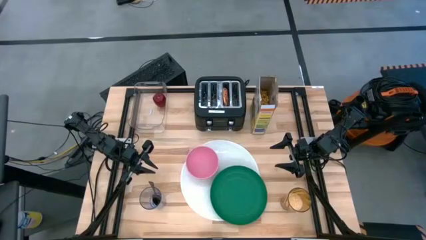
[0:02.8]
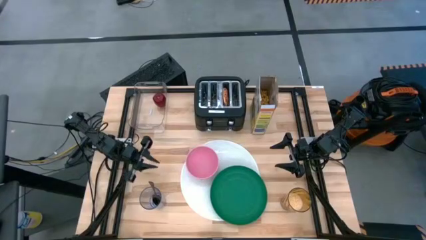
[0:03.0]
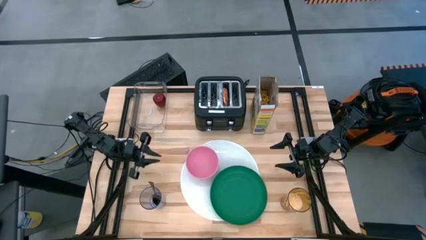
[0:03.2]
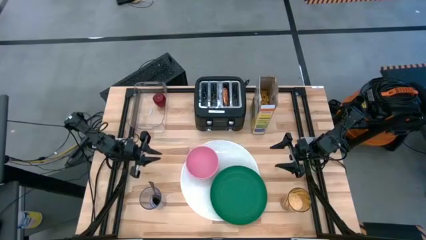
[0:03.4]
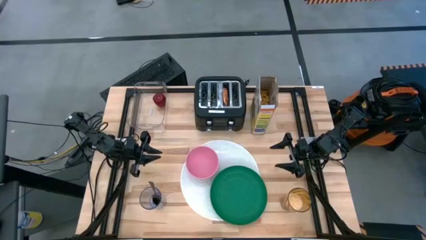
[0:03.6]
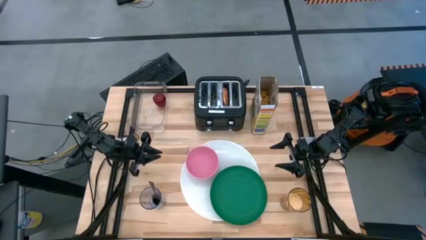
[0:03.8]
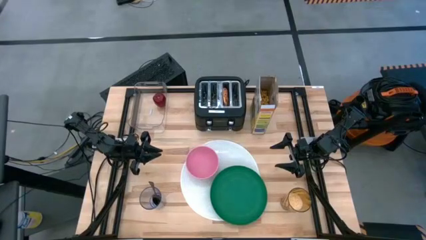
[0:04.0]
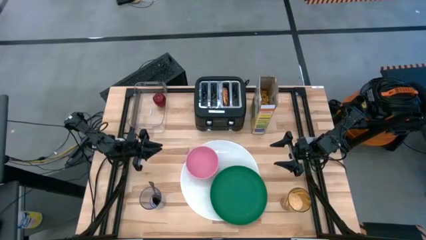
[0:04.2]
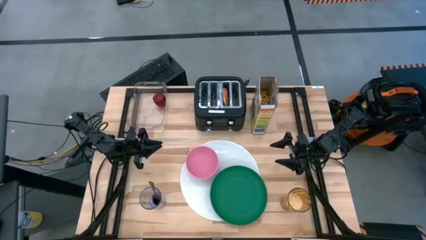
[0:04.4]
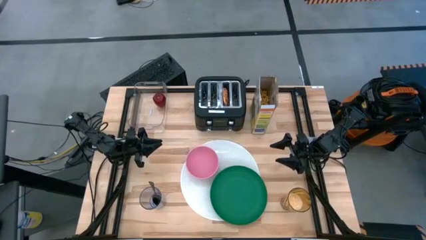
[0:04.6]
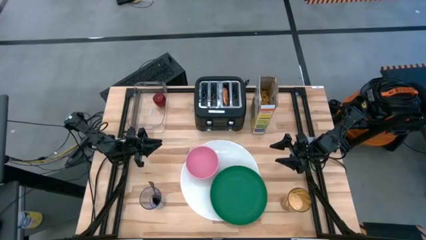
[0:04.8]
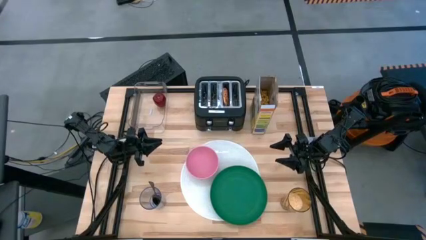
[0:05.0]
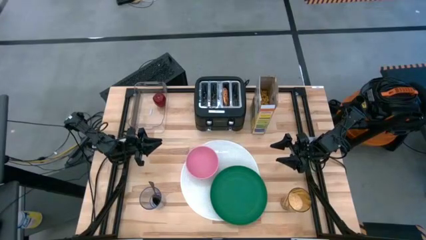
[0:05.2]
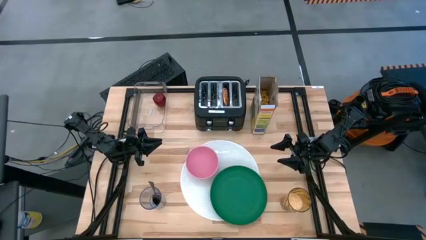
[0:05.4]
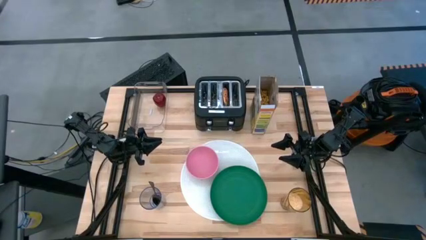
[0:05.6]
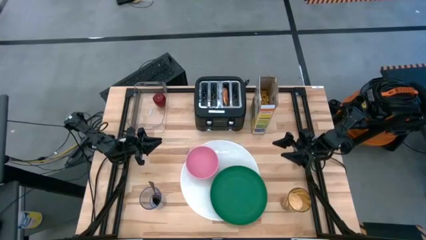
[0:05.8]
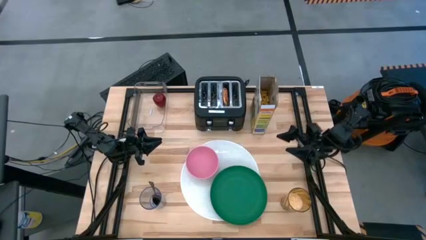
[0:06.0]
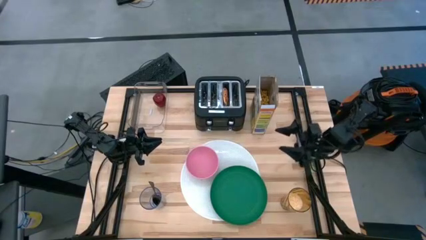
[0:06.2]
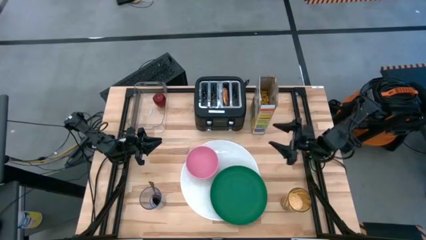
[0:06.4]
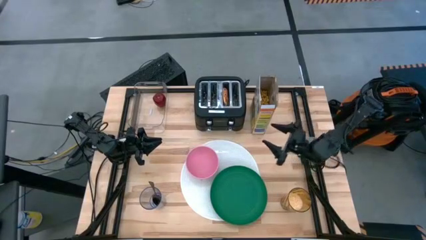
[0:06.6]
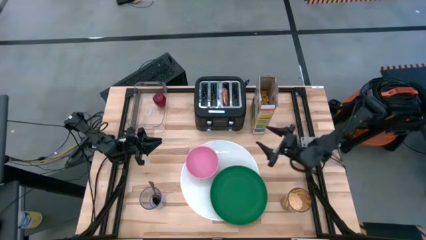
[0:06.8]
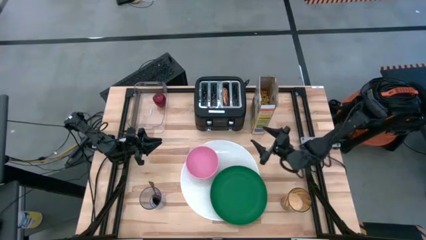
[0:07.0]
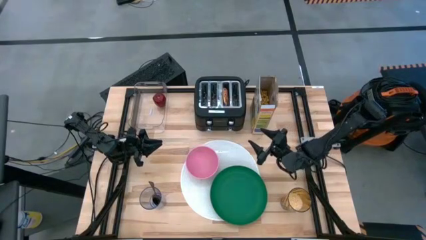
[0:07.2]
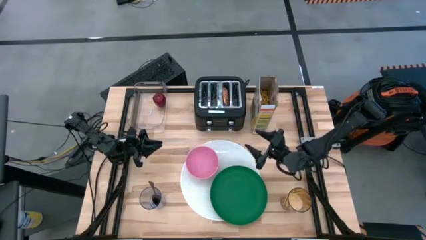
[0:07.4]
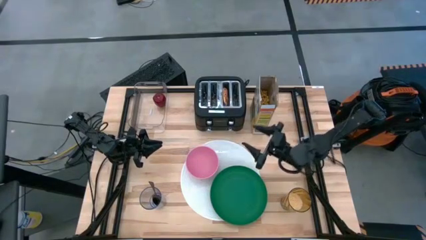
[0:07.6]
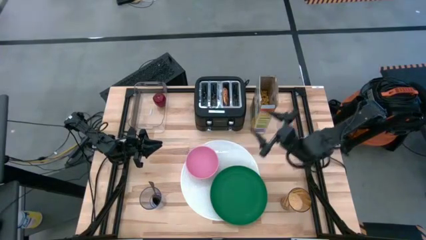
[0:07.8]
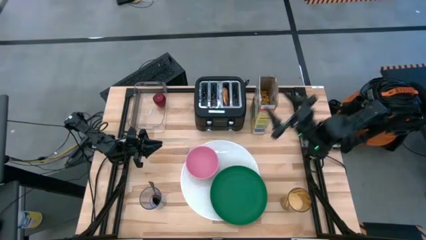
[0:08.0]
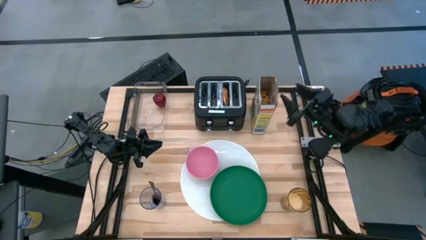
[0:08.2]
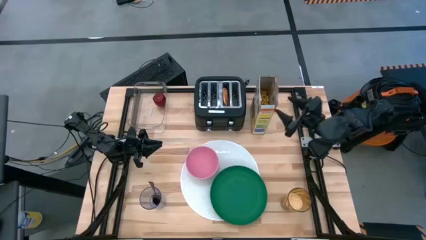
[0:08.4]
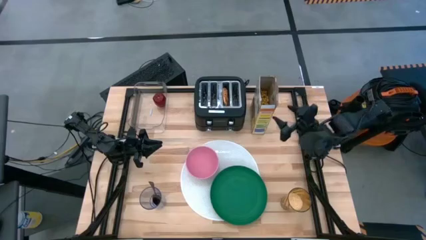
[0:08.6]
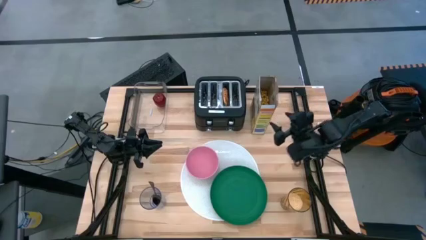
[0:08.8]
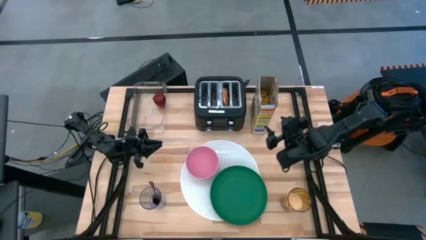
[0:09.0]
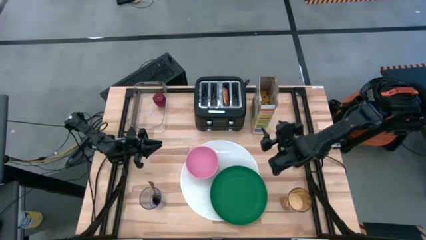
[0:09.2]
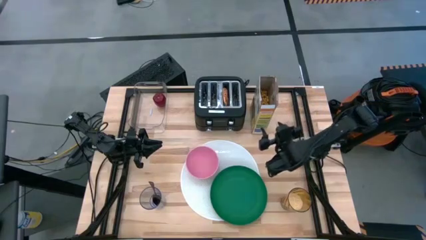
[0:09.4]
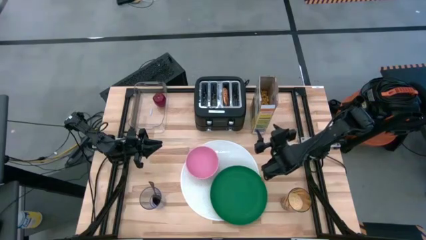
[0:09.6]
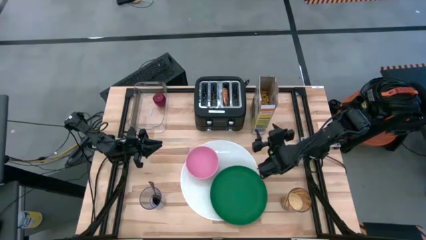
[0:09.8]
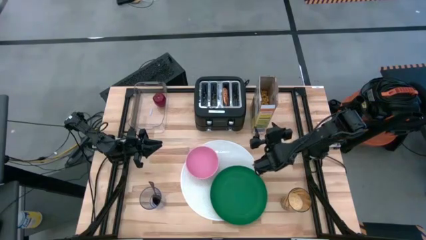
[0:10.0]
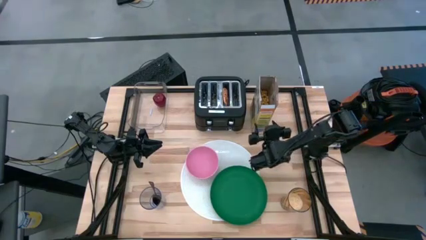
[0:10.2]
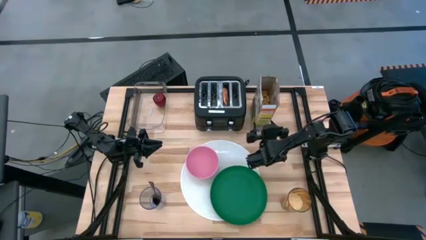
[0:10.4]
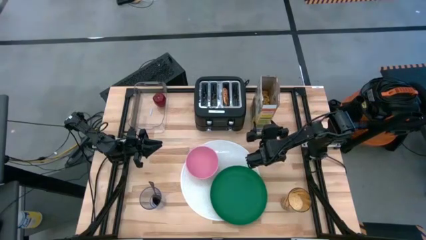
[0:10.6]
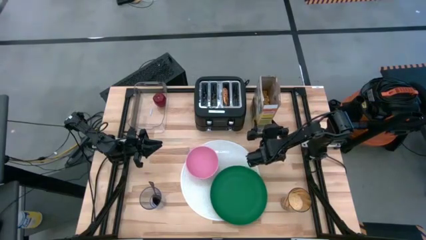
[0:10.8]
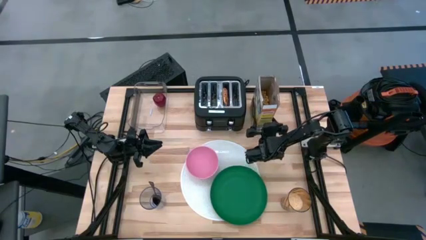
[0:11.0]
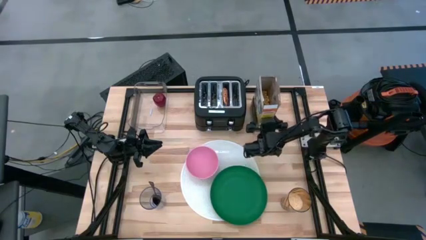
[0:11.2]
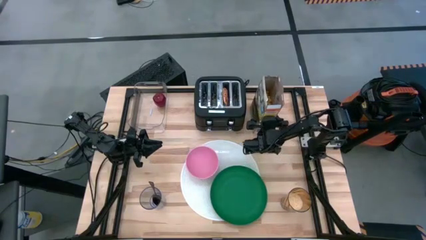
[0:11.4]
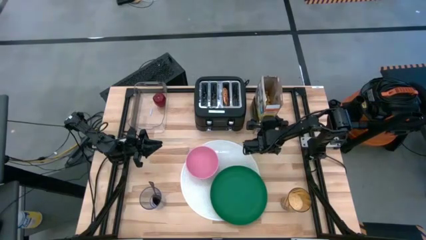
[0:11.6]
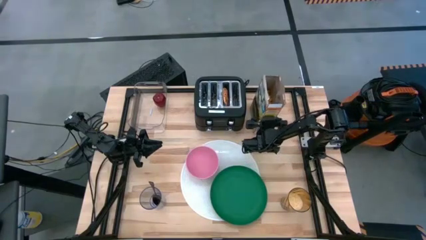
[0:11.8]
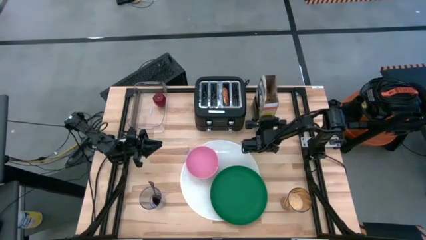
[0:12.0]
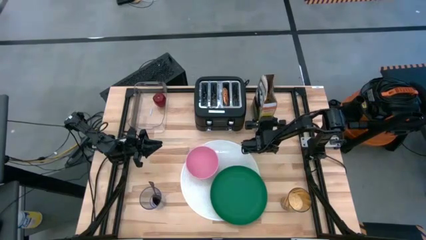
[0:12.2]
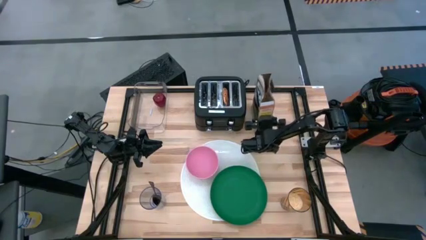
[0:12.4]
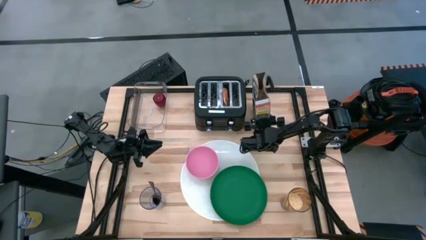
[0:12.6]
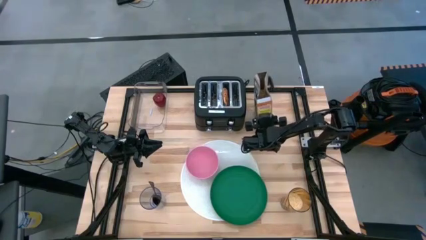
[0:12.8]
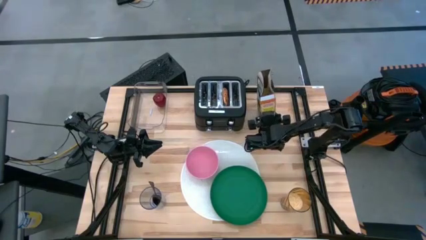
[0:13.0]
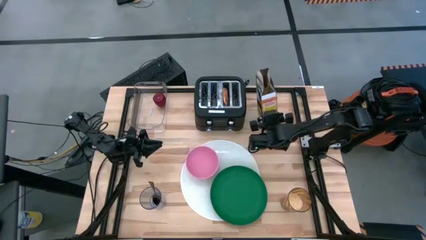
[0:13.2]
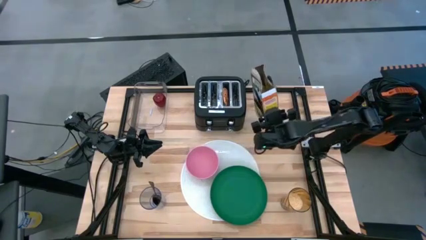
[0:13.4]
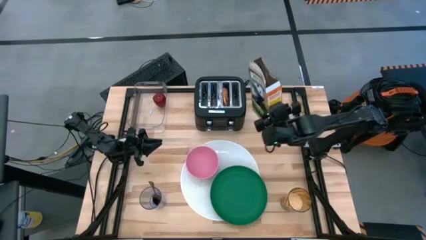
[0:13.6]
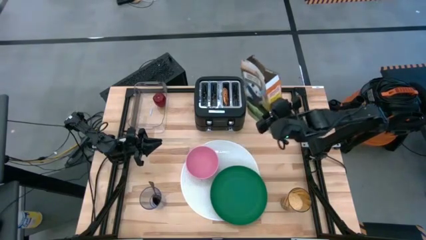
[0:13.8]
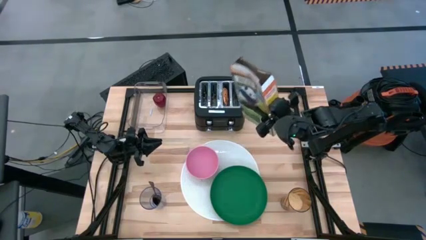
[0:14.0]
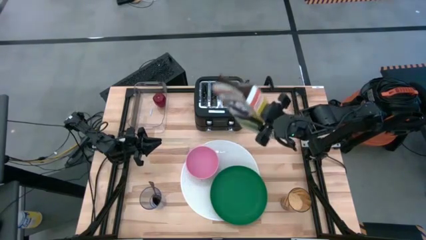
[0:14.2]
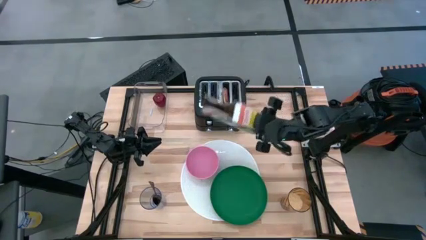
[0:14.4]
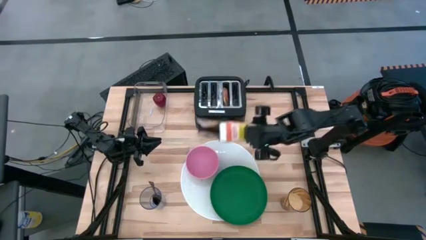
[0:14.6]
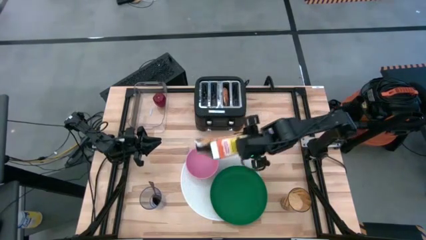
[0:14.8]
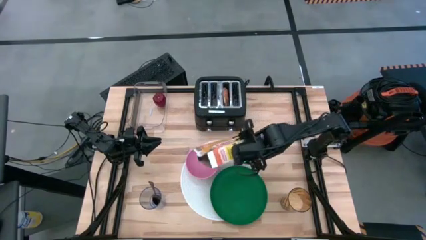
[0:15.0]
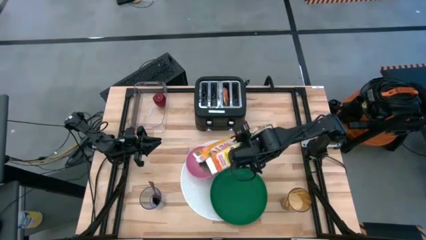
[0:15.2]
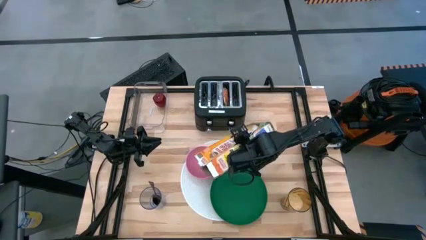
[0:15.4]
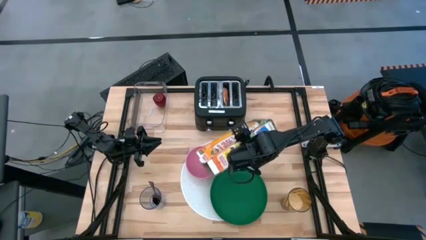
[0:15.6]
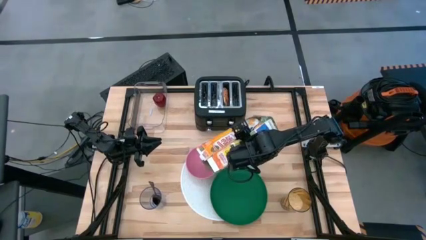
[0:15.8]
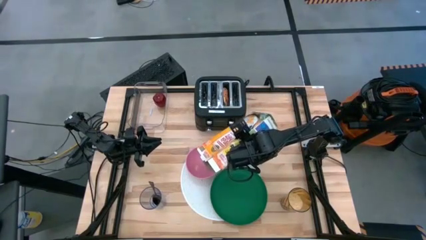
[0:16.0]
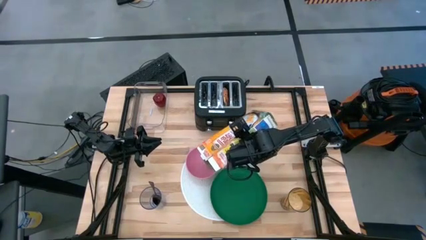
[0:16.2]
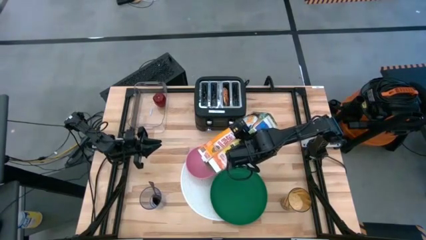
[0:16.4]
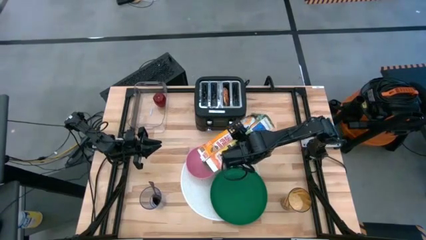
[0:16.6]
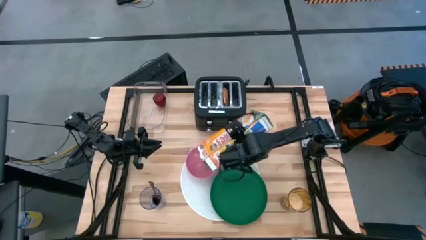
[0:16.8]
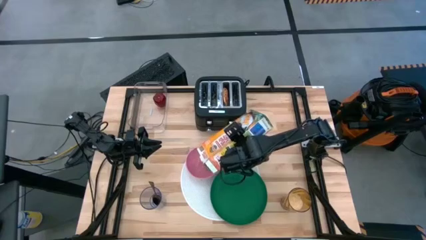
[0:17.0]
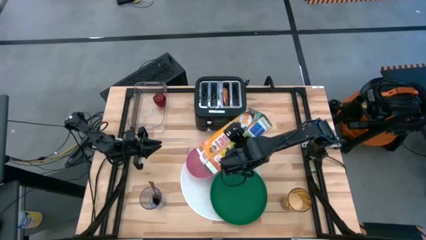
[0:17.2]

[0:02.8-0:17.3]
Task: Arrange a breakfast setting
Pour the cereal into the pink bowl
